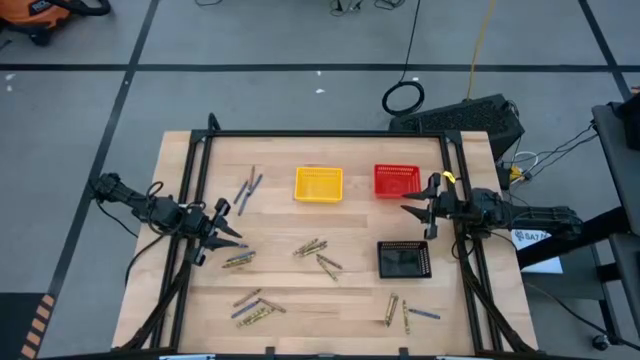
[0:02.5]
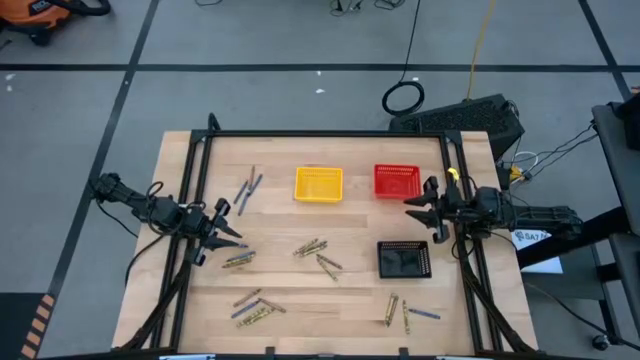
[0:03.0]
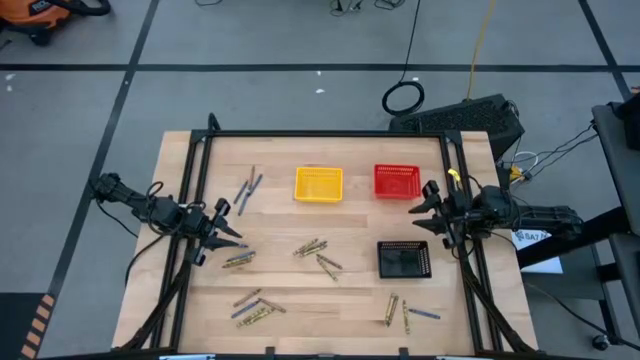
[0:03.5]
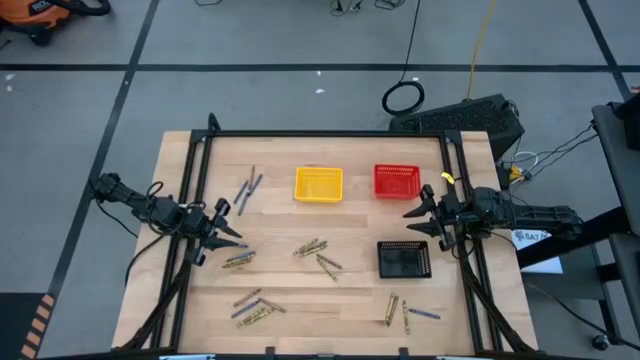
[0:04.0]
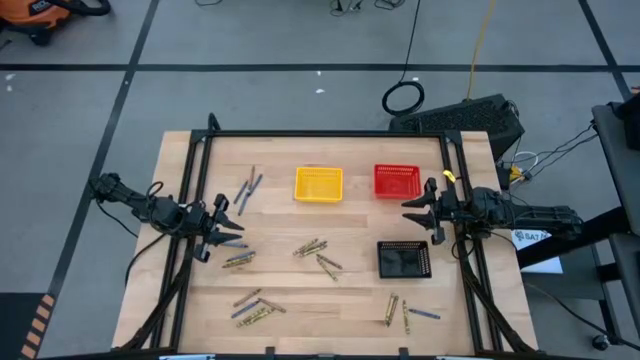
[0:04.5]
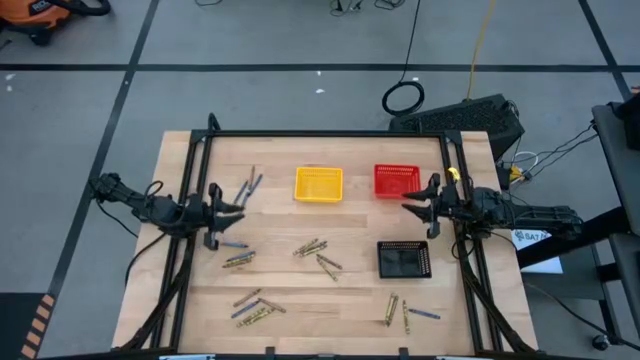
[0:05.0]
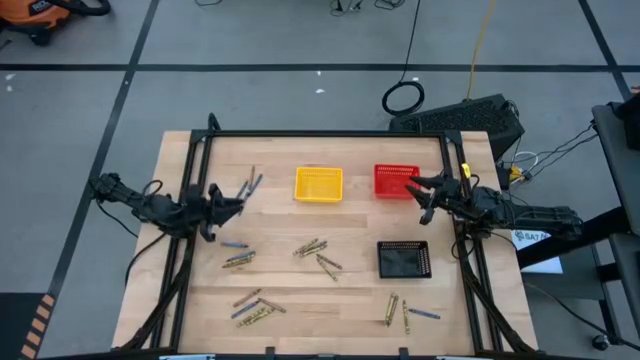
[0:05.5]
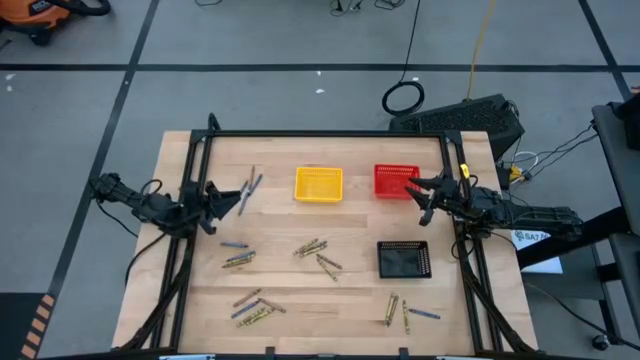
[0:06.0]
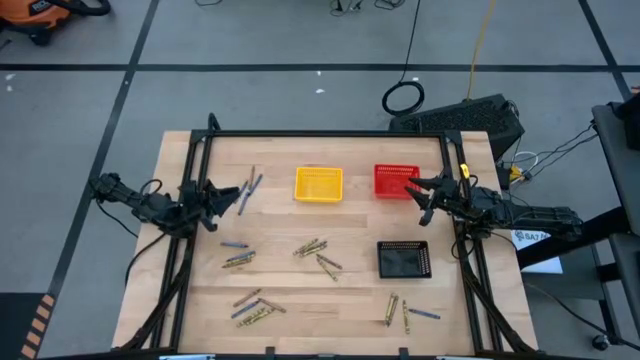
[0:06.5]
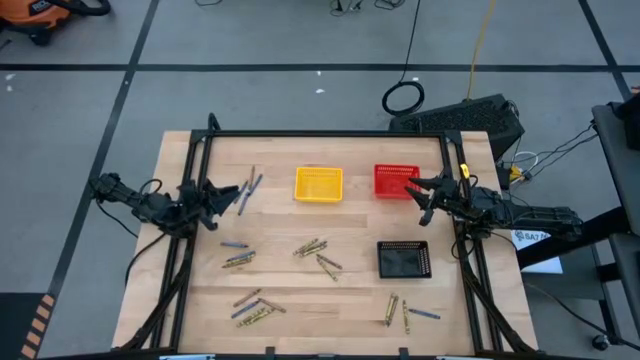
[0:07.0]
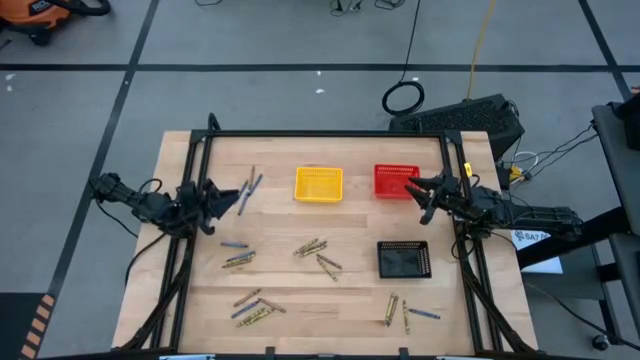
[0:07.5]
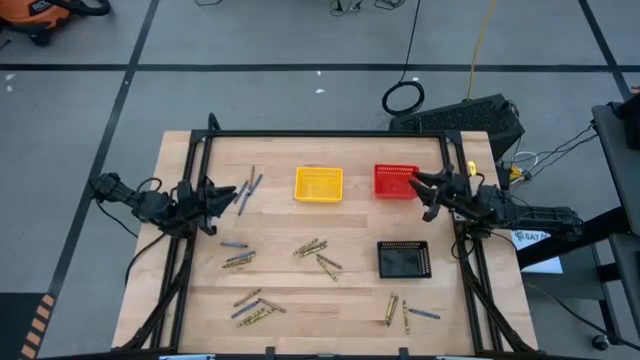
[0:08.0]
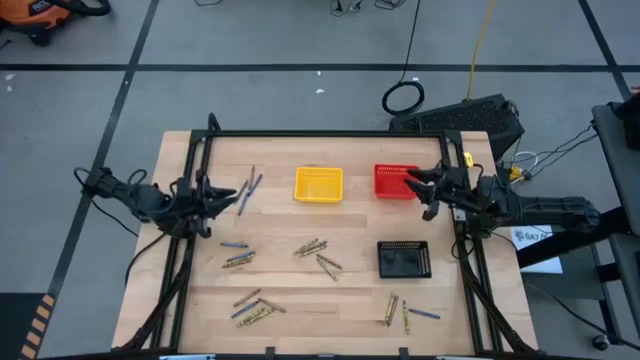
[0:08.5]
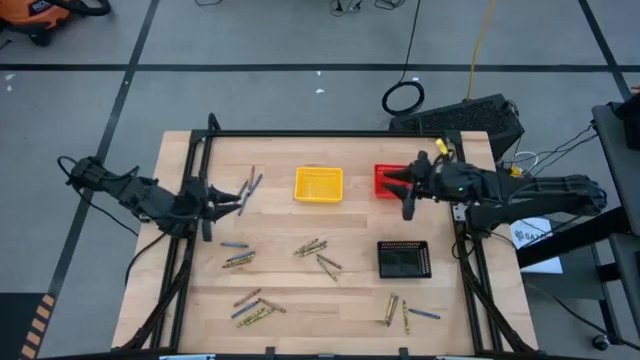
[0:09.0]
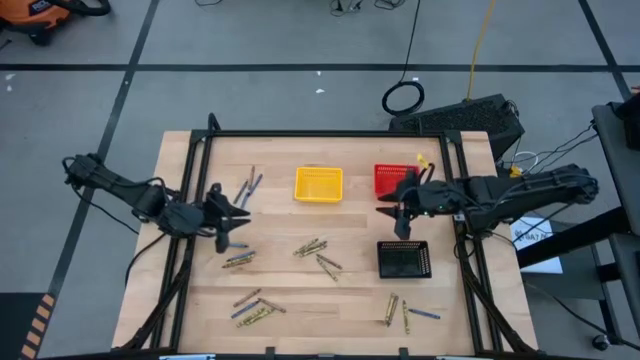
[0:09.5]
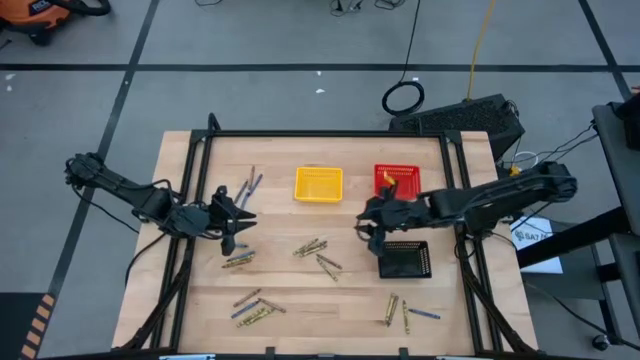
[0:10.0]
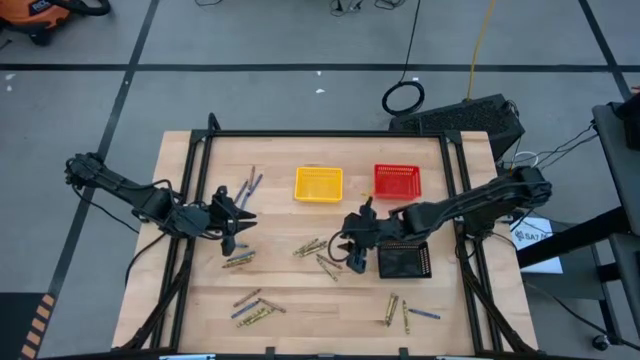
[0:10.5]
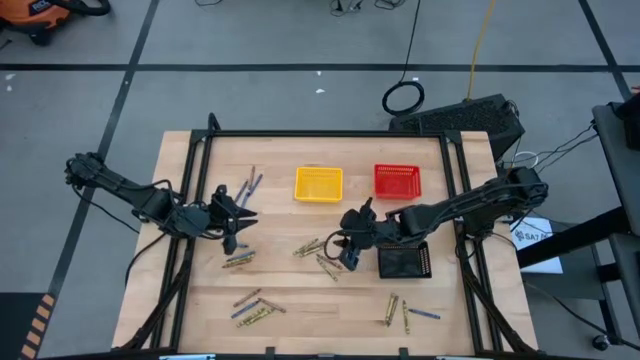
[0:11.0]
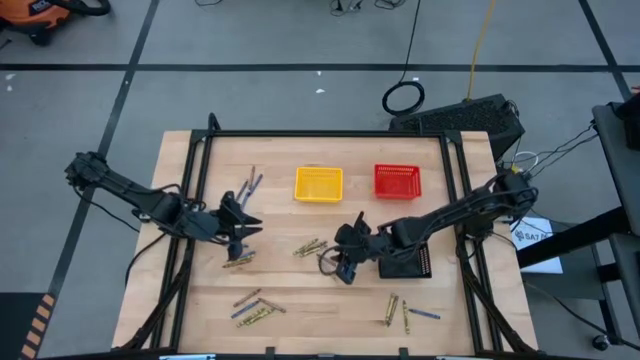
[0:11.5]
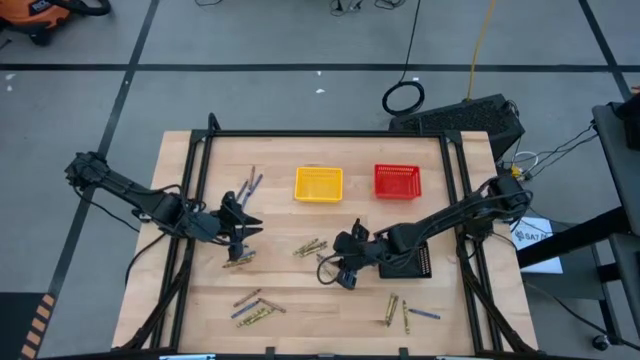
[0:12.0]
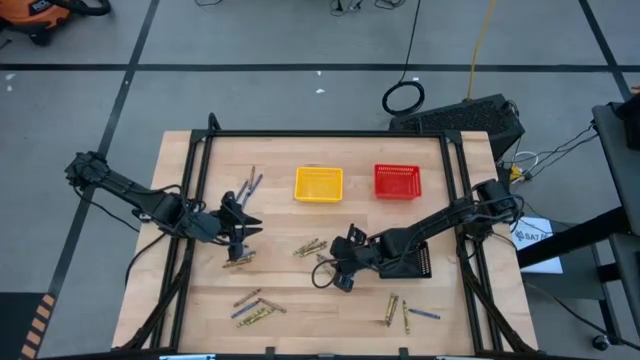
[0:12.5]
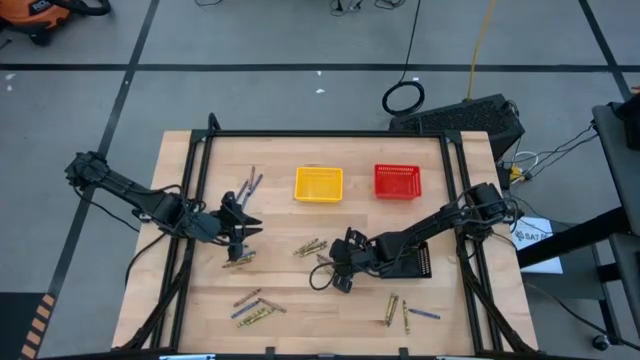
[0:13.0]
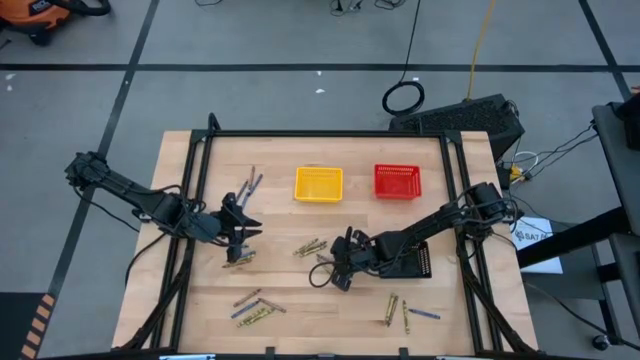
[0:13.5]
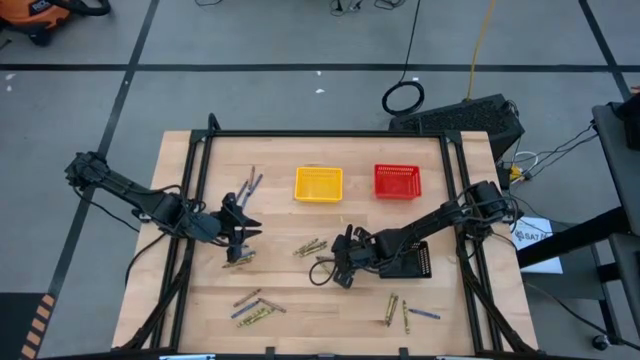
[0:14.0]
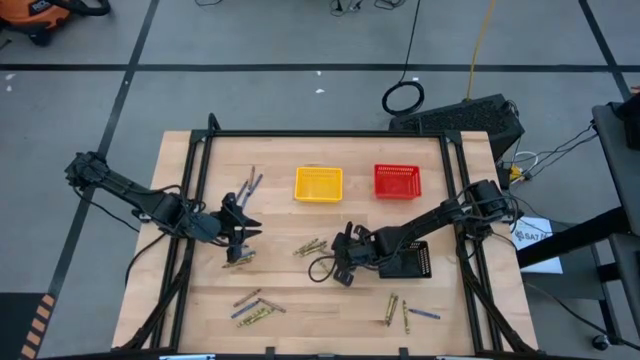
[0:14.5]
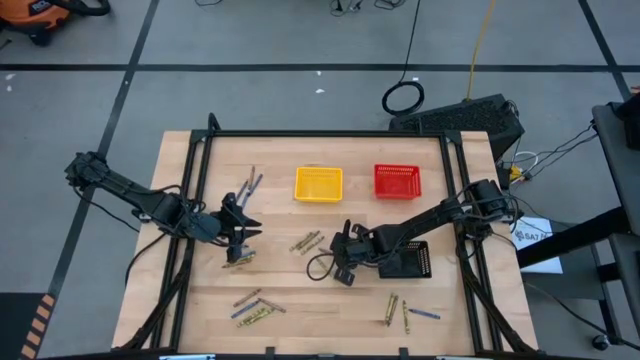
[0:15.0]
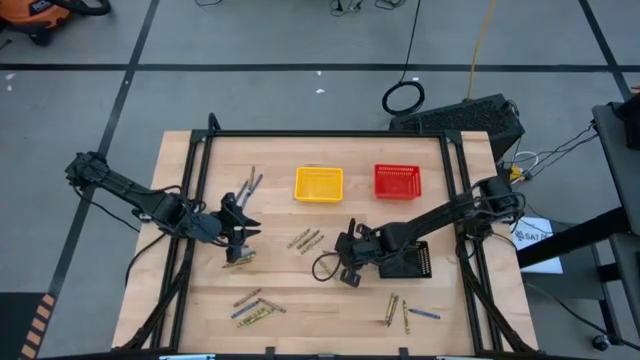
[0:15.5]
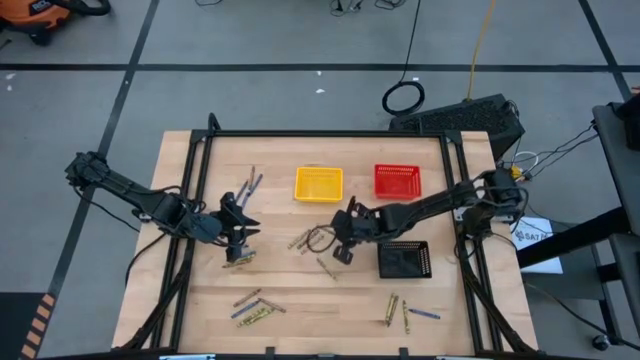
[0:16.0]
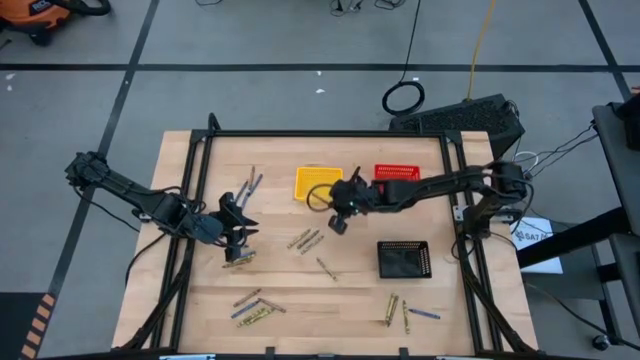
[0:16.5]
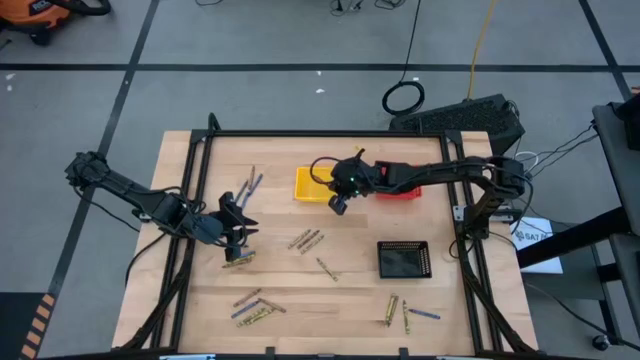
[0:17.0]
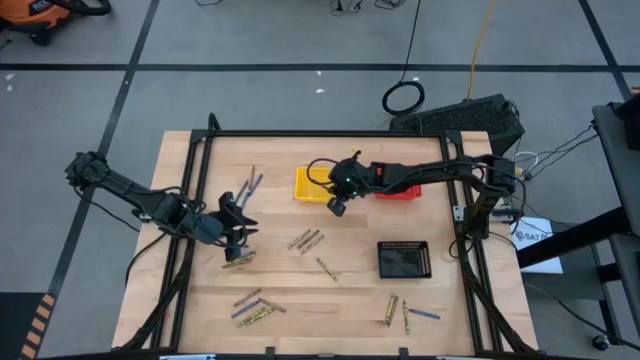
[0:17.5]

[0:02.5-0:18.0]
Task: Sort crayons
Put the brown crayon into the yellow bin

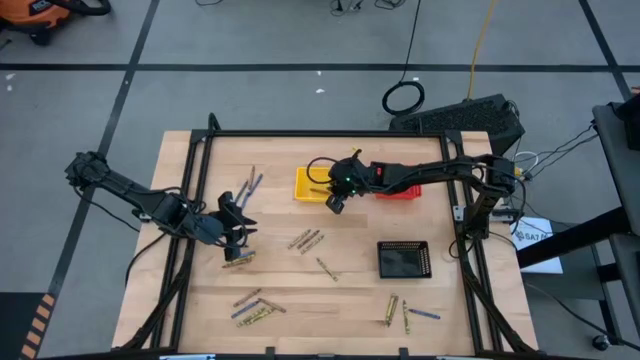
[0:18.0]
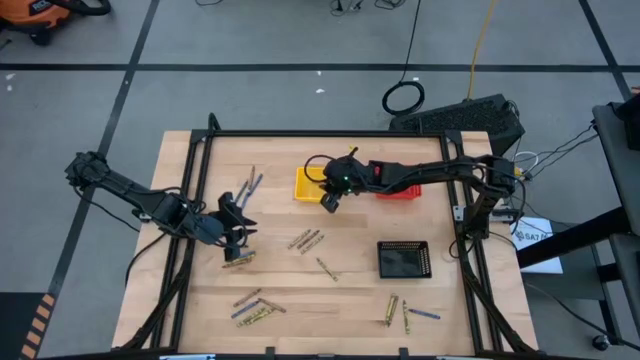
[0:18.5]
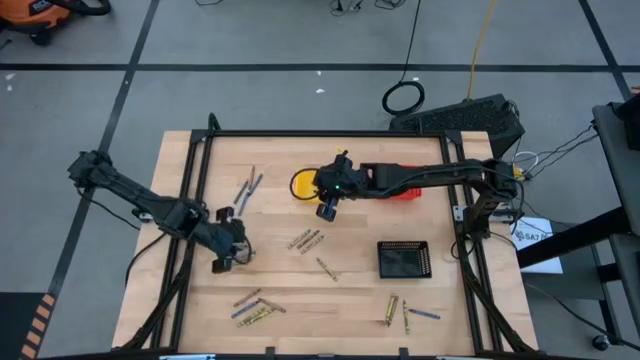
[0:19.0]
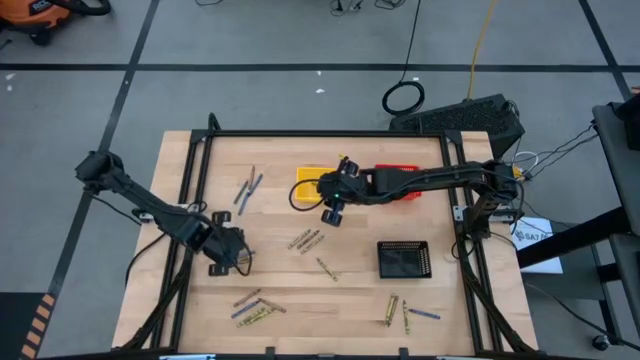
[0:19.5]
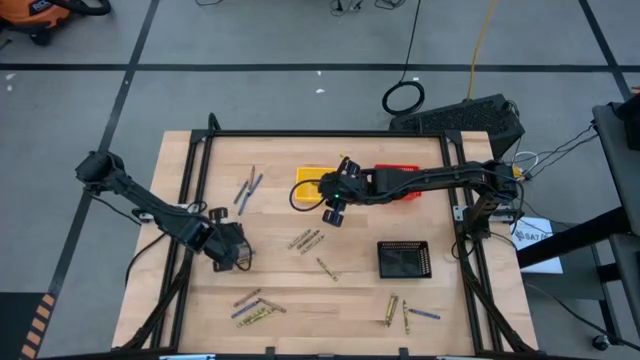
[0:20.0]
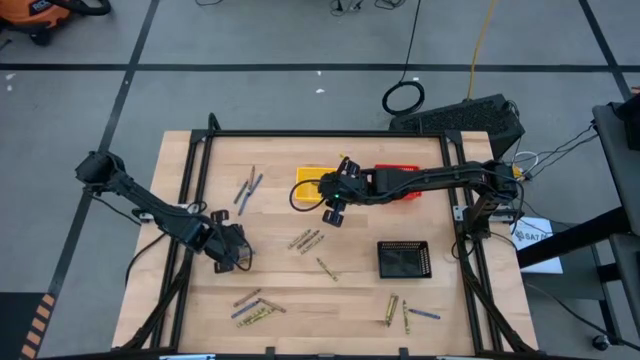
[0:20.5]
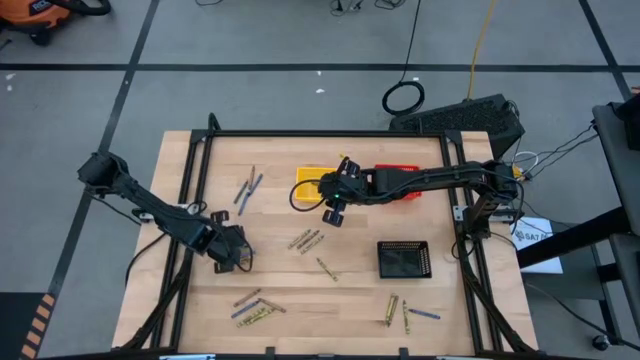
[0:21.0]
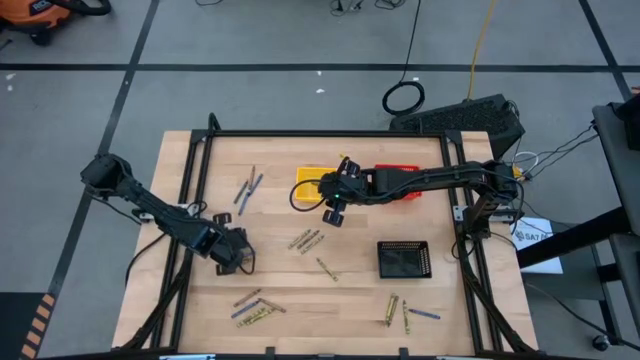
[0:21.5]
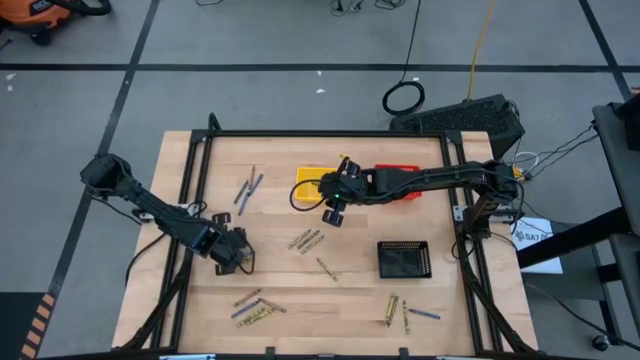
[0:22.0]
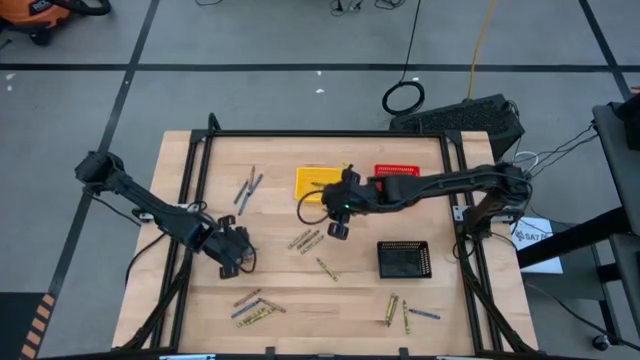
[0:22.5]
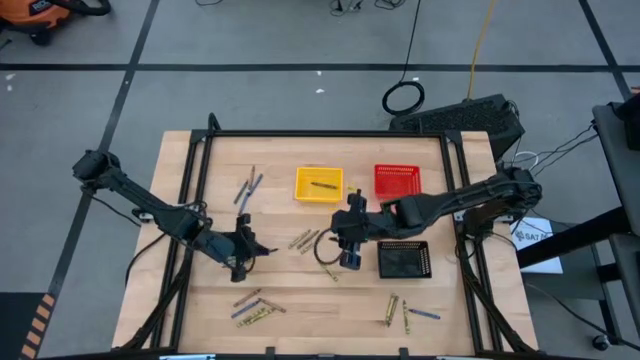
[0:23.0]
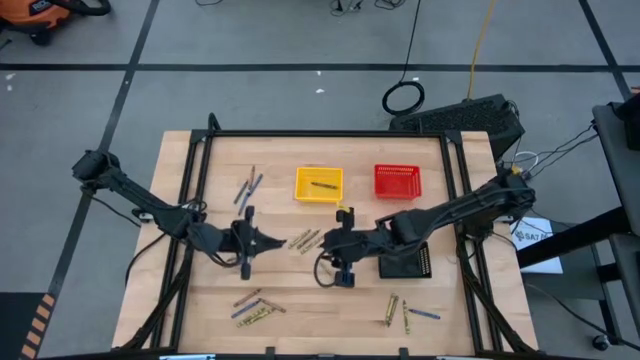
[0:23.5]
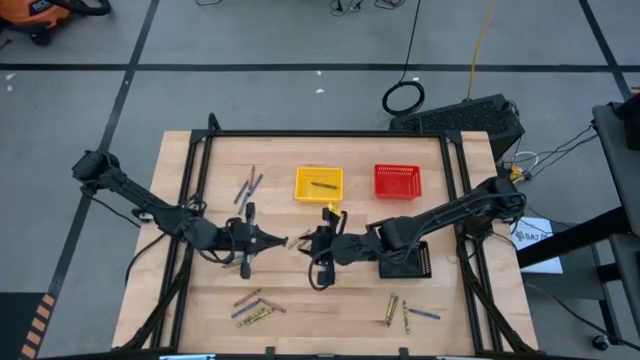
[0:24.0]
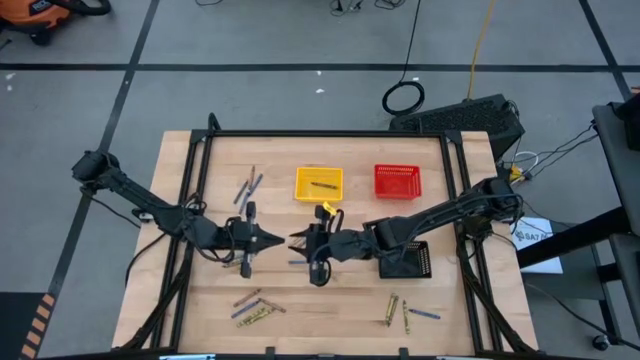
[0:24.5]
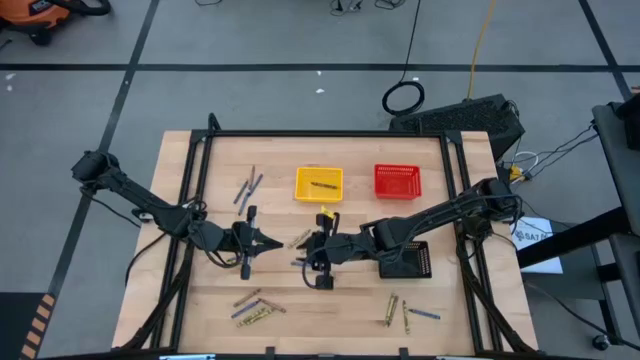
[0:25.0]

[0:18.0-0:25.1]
Put the blue crayon into the red bin
